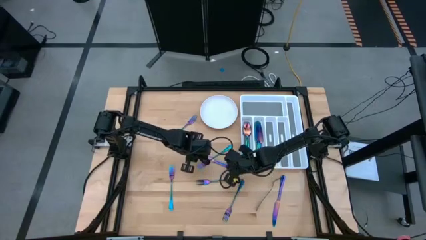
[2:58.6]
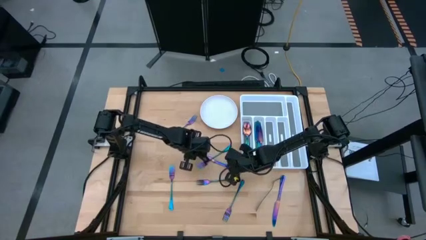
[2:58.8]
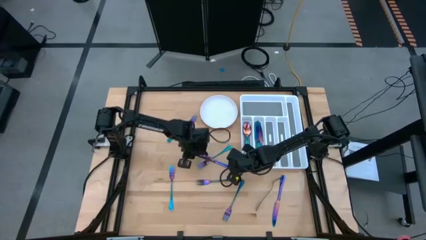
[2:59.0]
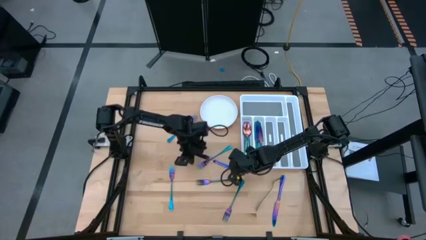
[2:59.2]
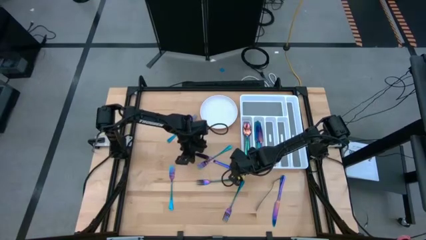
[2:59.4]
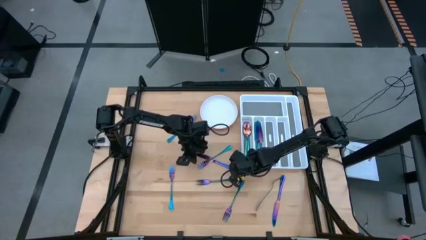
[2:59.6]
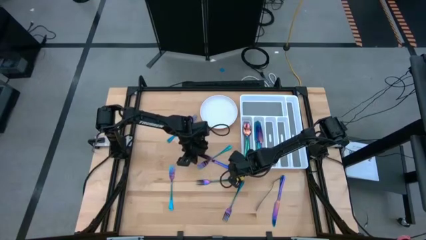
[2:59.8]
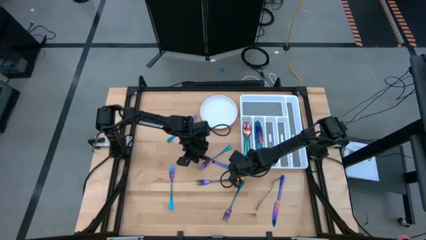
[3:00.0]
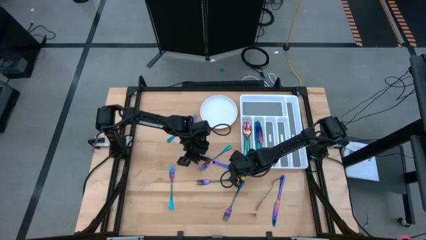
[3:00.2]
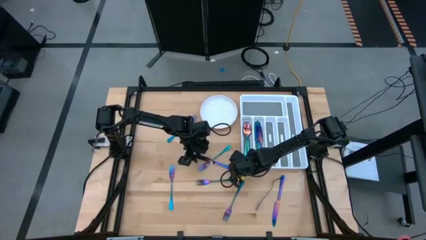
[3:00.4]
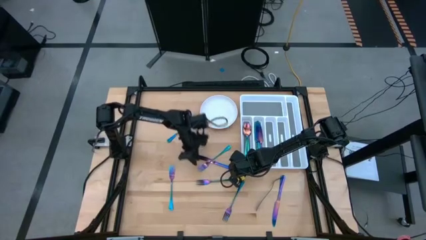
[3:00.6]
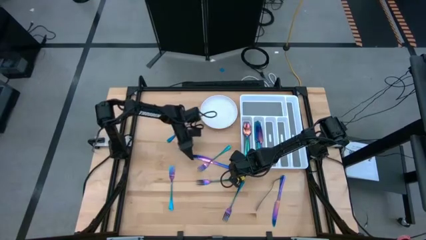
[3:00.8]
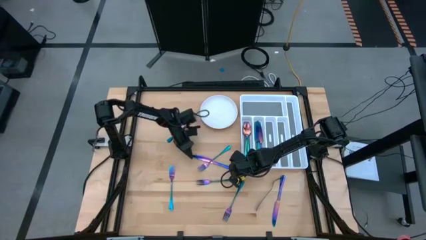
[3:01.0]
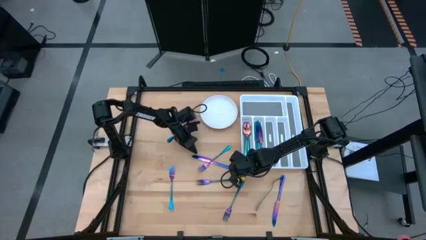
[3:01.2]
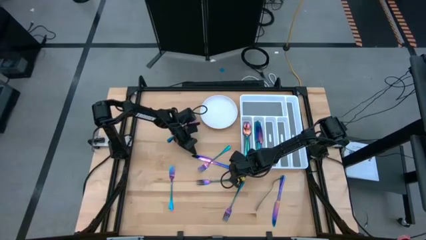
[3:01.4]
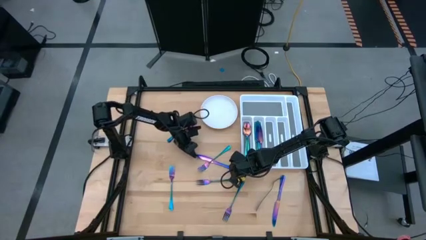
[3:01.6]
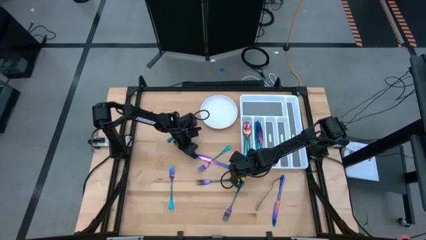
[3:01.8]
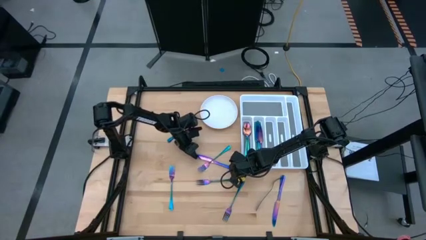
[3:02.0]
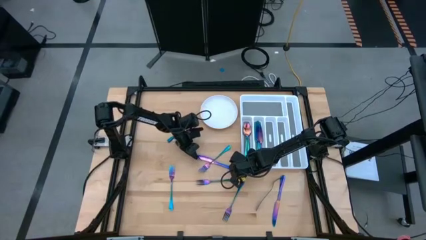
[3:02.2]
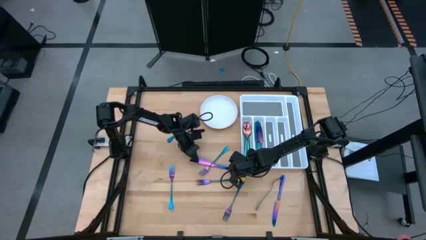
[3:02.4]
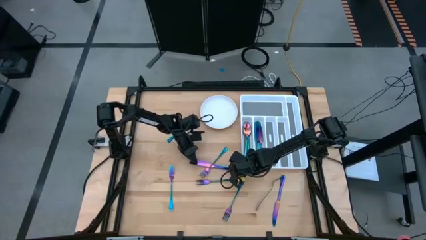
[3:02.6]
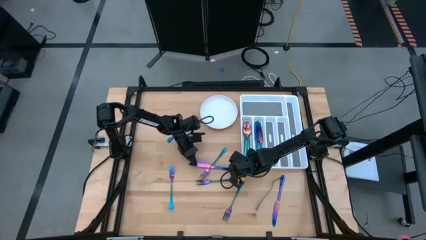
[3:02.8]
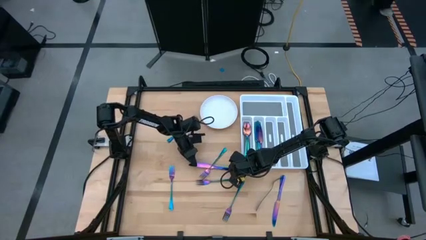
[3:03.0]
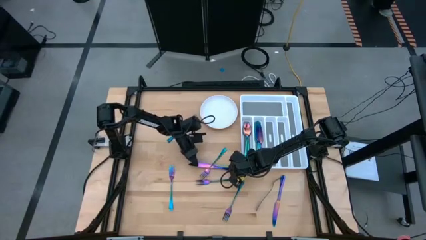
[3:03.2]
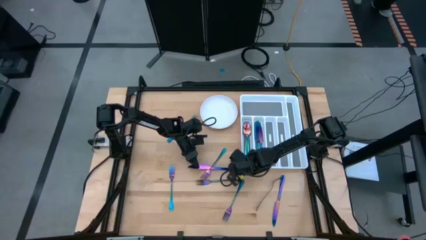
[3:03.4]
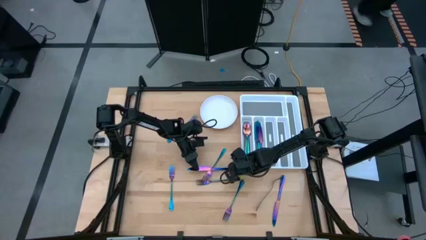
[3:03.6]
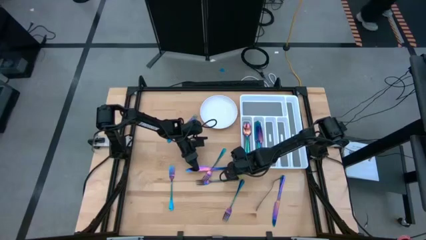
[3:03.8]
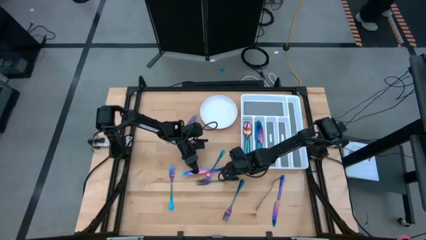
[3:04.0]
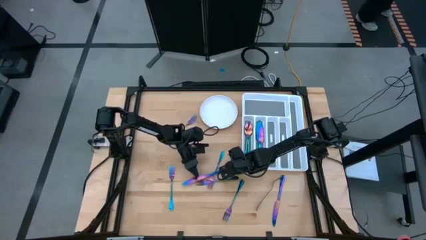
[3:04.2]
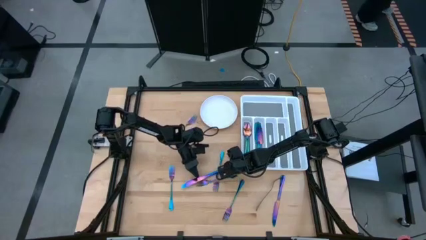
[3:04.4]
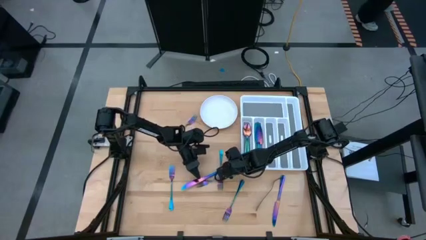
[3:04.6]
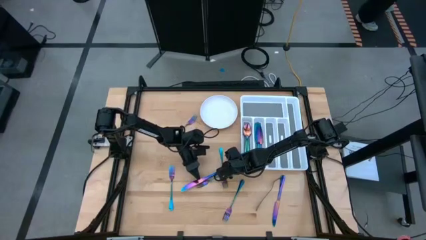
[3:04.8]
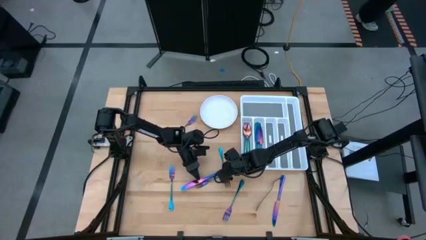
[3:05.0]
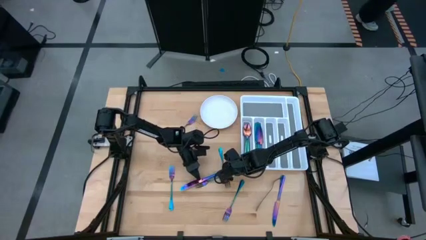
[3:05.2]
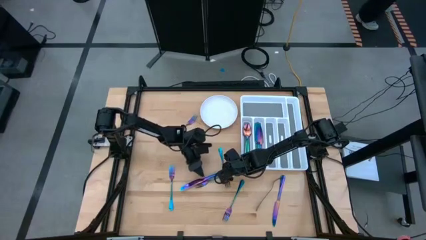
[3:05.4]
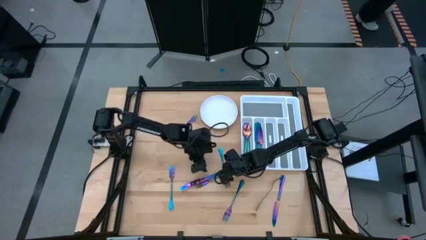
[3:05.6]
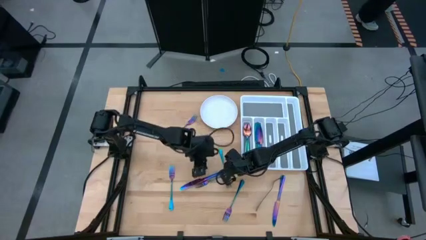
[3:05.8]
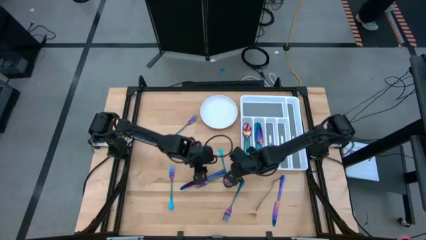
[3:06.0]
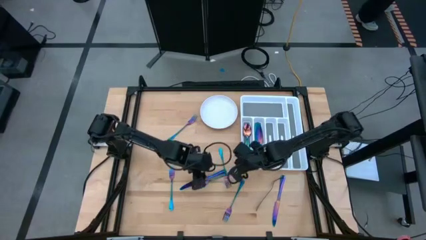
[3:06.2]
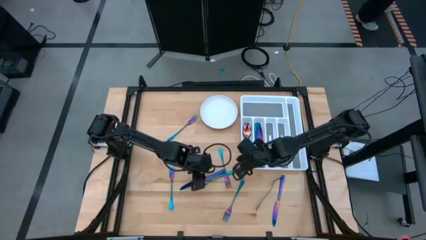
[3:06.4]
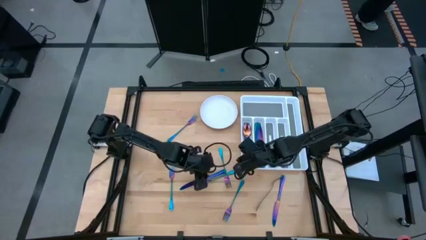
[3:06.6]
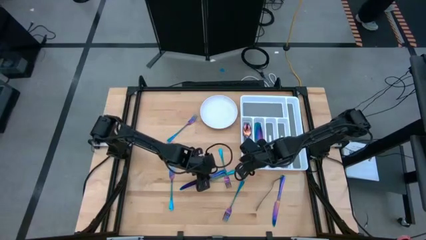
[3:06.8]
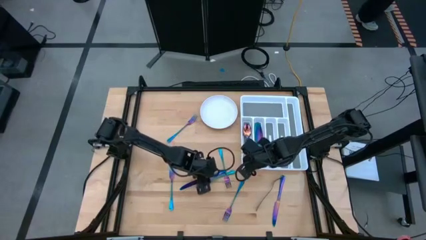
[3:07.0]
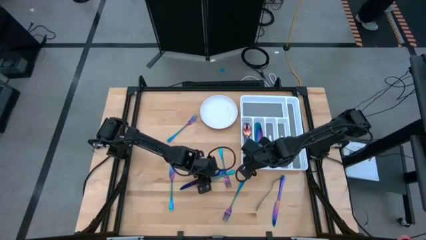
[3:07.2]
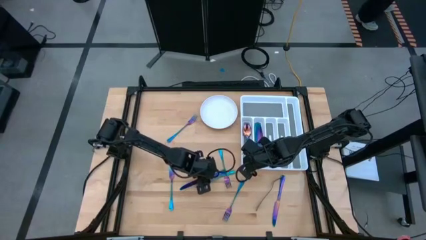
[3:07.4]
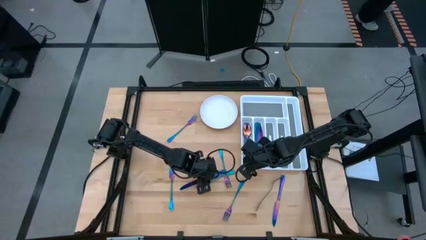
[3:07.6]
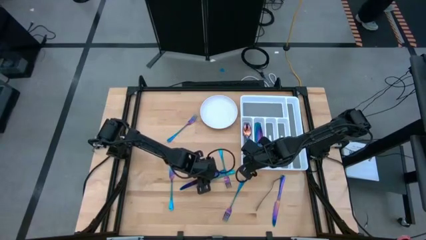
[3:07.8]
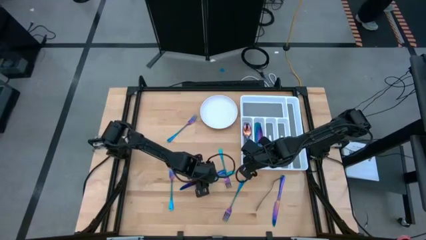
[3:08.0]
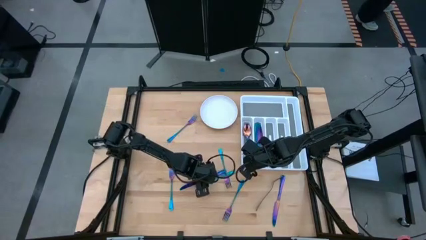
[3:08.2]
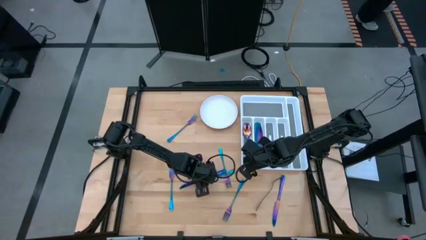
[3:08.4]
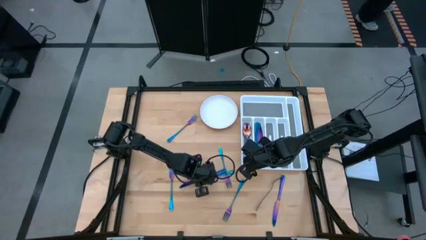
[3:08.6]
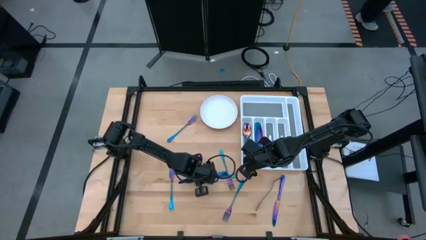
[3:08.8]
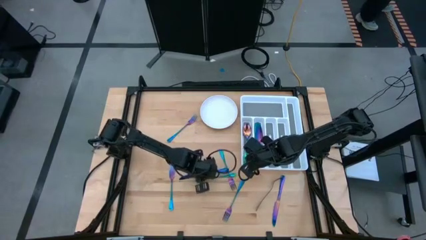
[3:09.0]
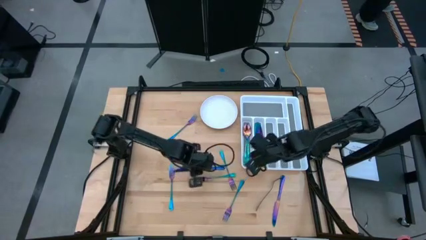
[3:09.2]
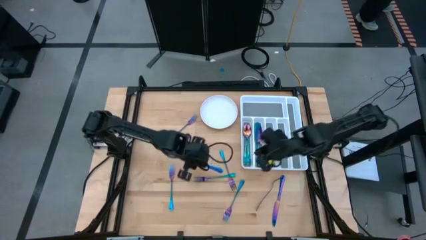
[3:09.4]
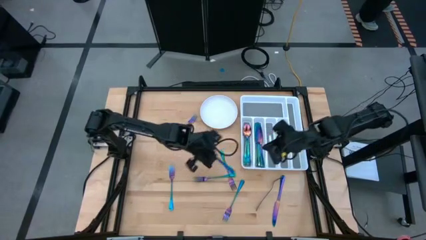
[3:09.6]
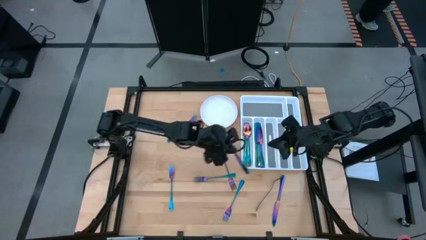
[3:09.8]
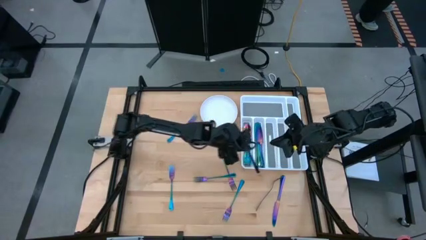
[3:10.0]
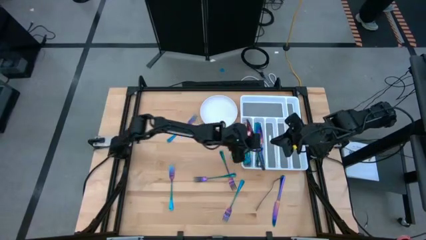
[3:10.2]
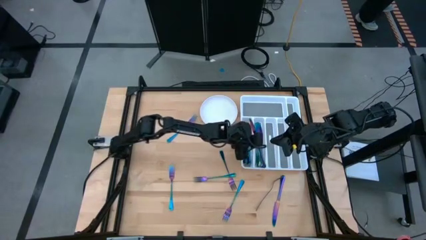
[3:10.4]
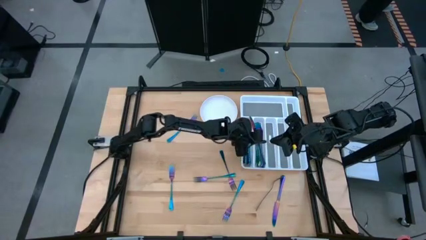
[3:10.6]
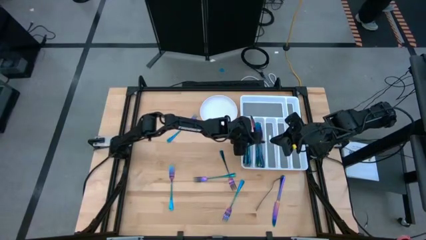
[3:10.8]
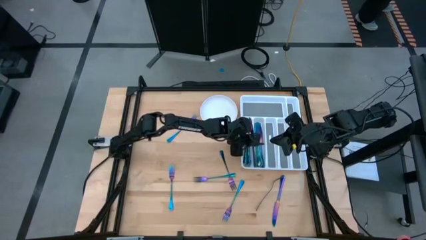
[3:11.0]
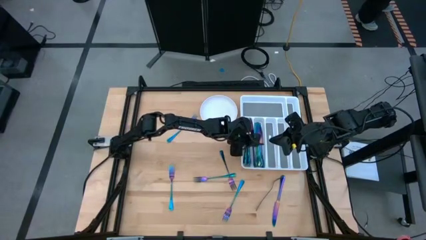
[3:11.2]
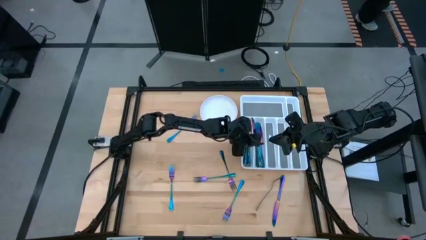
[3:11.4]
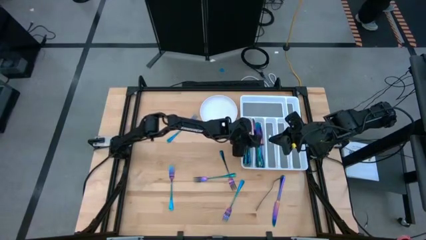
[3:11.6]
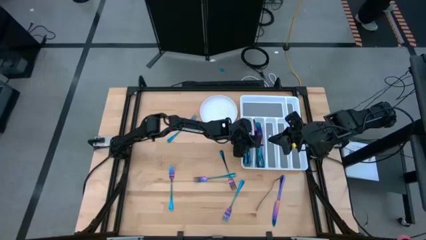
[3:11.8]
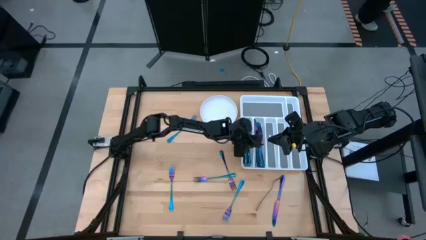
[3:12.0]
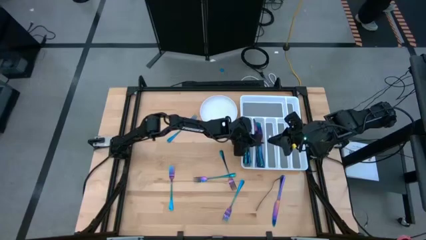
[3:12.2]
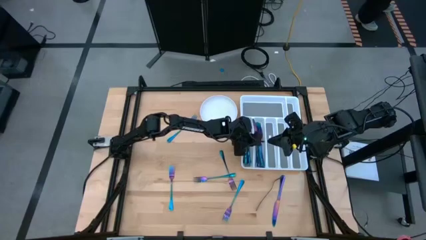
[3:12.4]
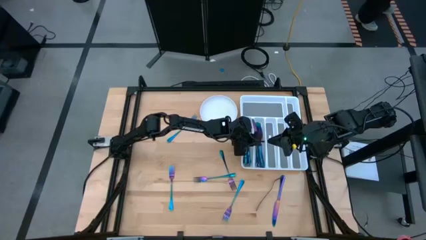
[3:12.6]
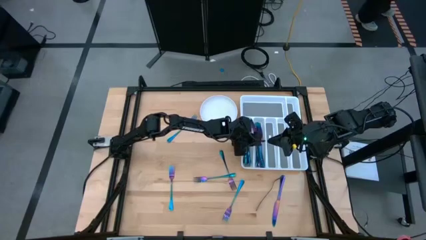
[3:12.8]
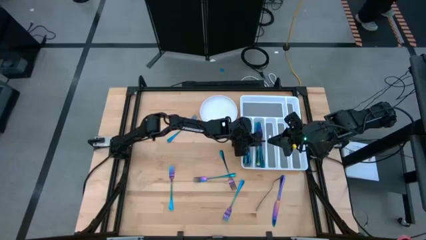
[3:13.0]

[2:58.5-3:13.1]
Task: Sort silverware
Put the purple table knife into the white silverware tray

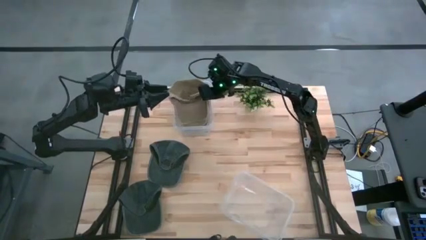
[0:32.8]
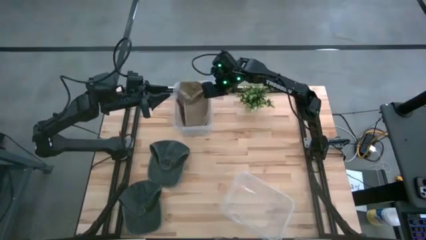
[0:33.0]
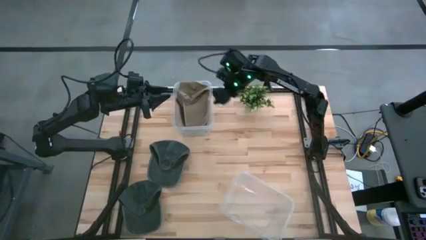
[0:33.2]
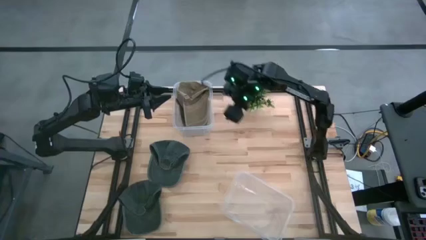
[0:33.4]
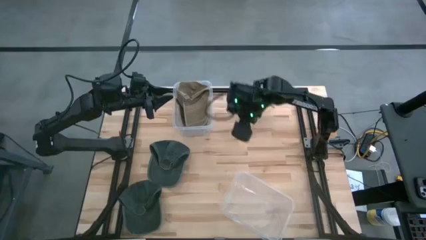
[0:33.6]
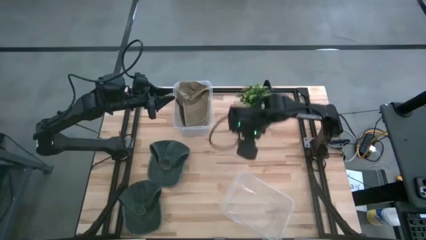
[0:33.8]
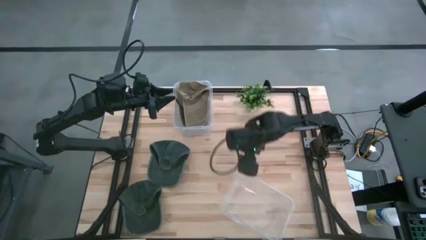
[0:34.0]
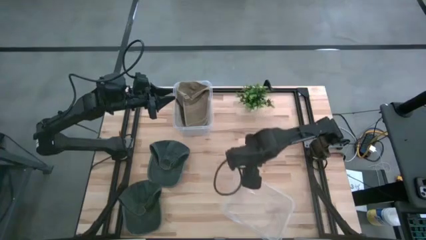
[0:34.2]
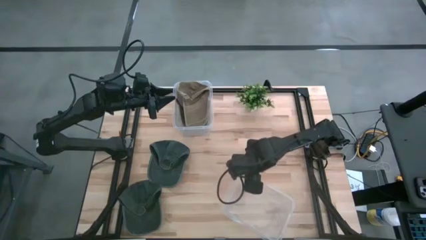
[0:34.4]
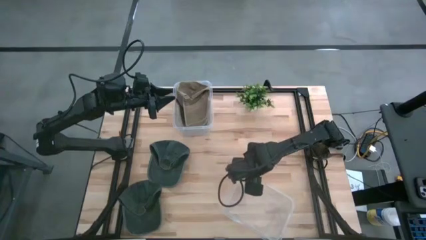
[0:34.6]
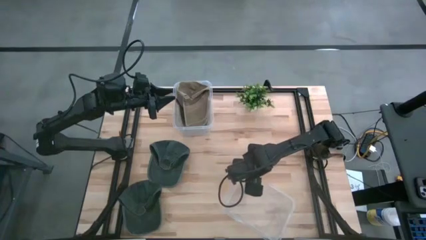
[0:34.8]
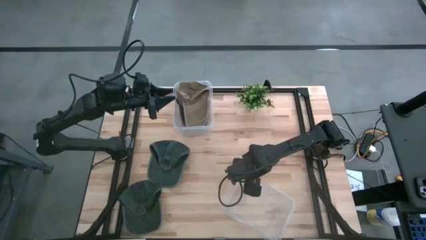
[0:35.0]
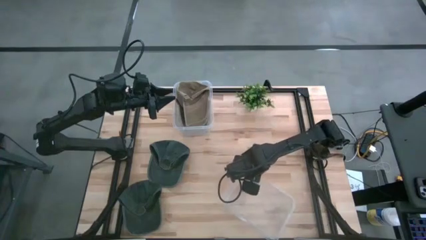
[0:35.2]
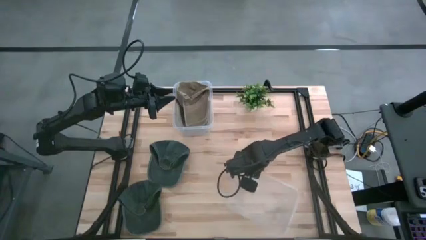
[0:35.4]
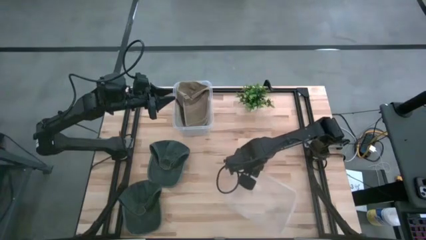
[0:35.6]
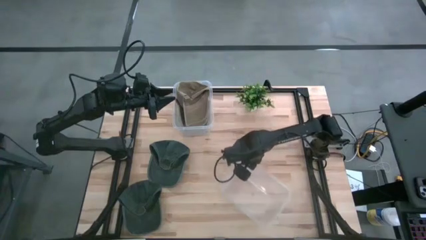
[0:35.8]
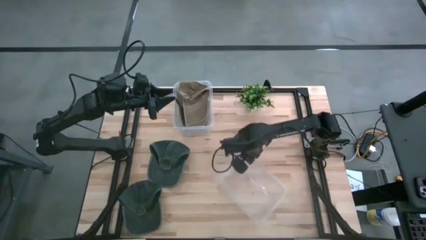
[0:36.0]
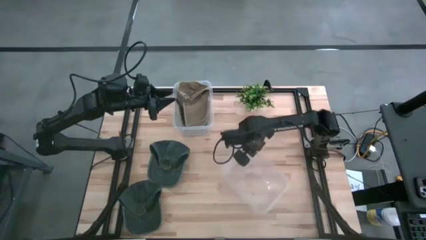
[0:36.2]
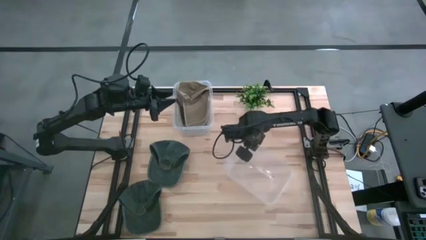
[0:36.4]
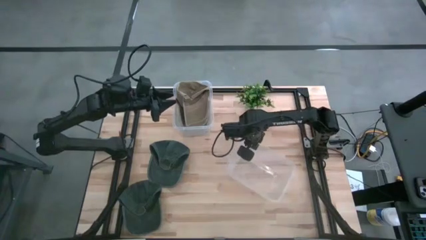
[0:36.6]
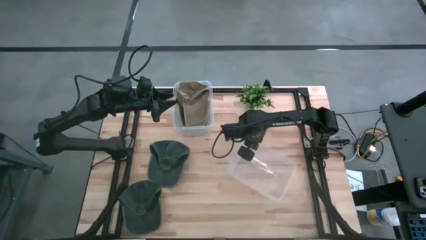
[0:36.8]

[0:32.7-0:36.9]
Task: Pick & Place hat
Adjust the bottom transparent bin on the table
